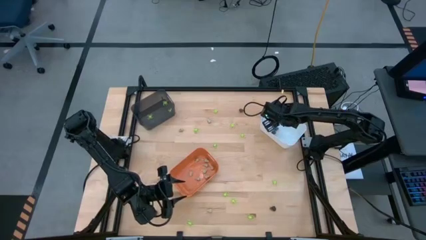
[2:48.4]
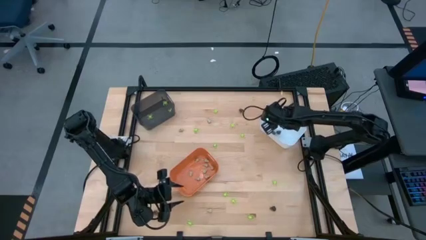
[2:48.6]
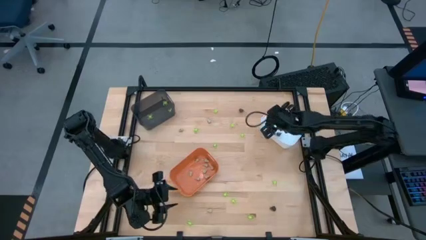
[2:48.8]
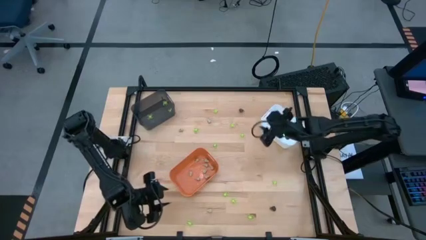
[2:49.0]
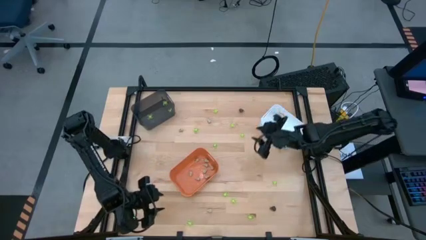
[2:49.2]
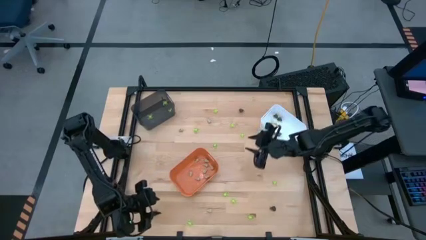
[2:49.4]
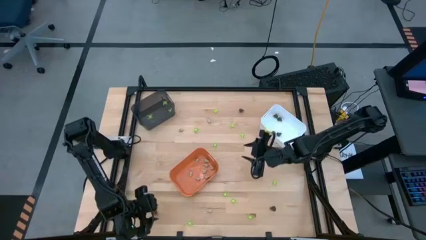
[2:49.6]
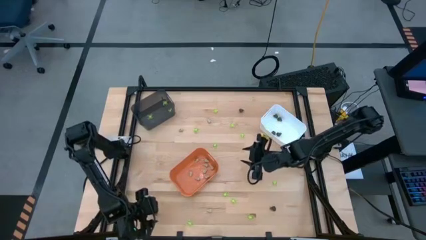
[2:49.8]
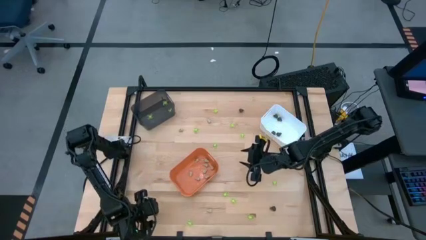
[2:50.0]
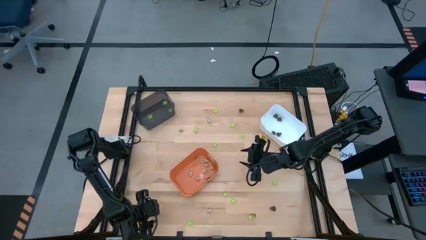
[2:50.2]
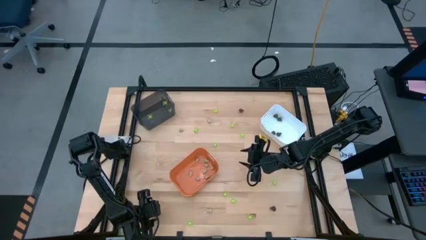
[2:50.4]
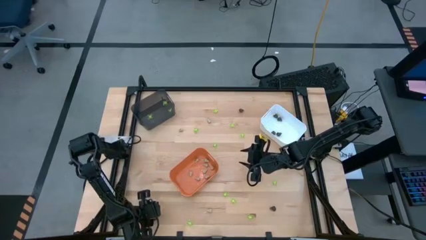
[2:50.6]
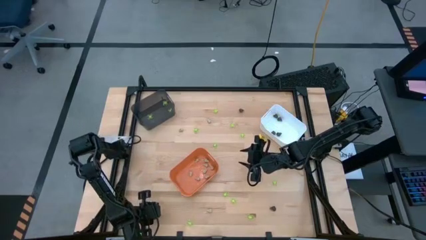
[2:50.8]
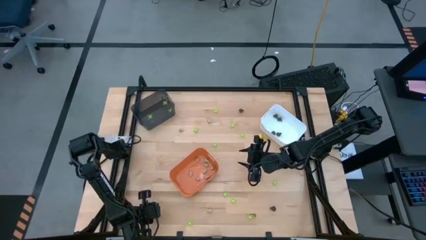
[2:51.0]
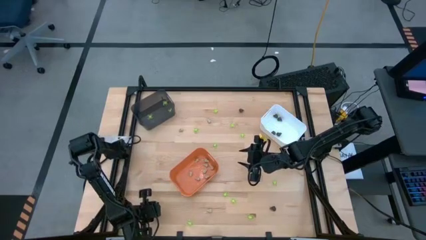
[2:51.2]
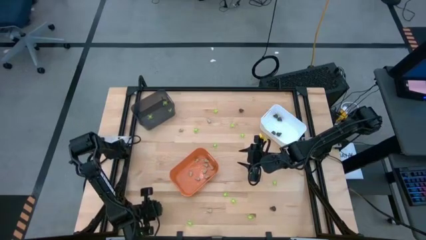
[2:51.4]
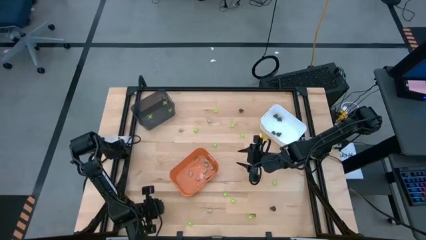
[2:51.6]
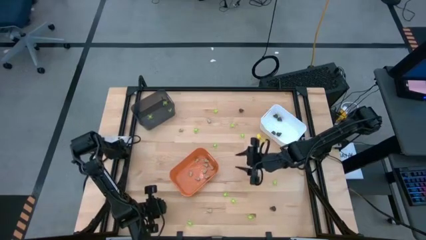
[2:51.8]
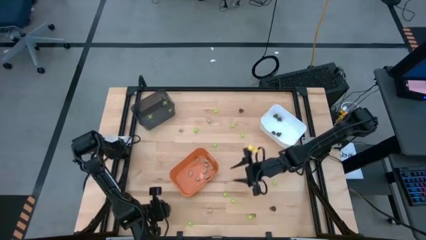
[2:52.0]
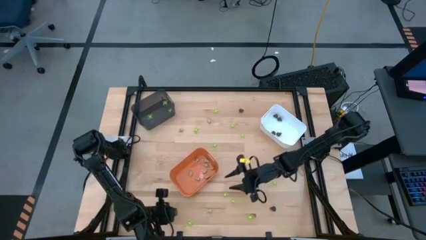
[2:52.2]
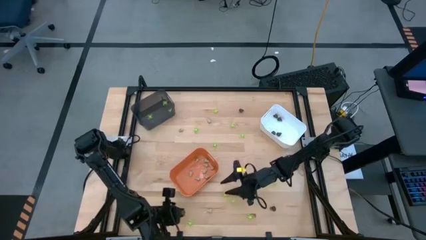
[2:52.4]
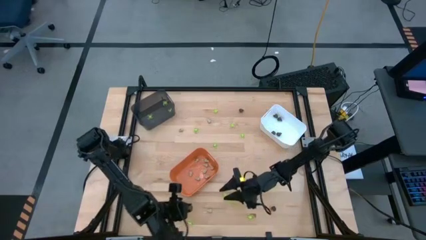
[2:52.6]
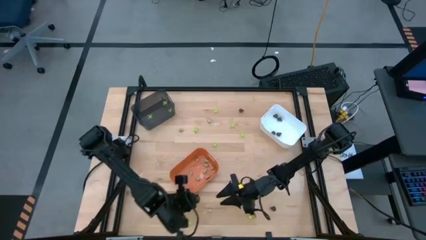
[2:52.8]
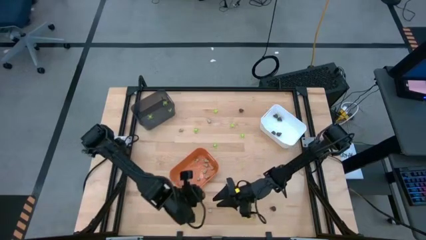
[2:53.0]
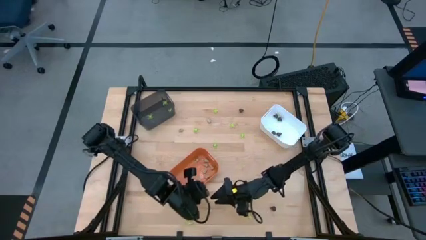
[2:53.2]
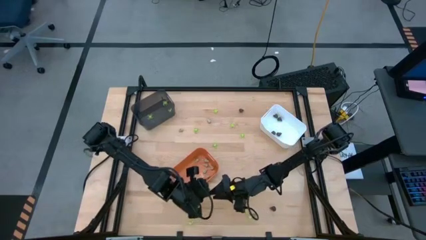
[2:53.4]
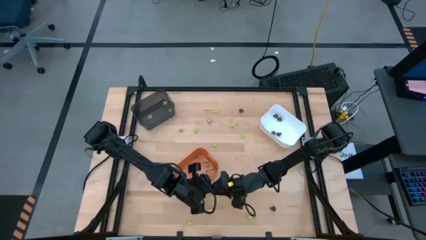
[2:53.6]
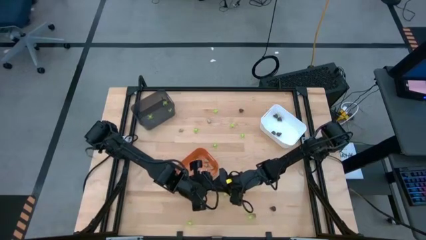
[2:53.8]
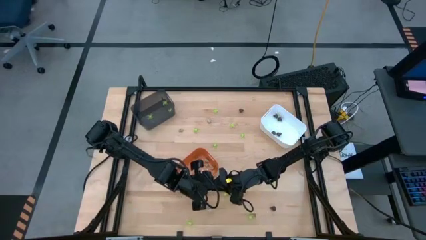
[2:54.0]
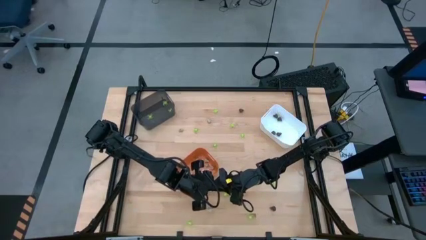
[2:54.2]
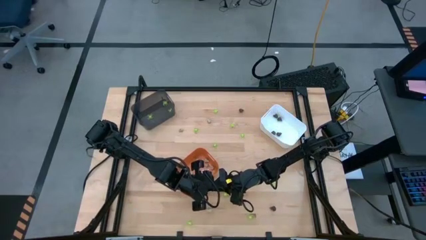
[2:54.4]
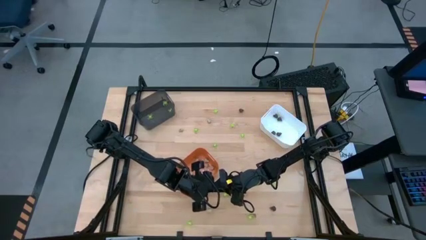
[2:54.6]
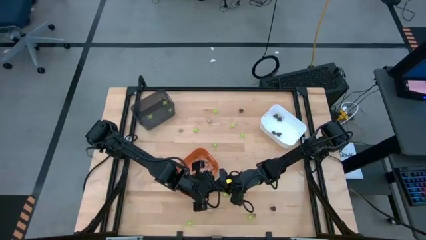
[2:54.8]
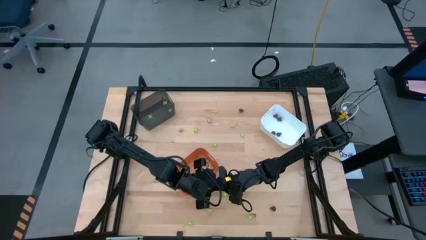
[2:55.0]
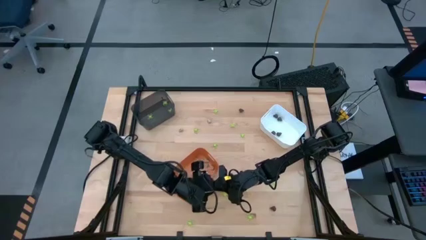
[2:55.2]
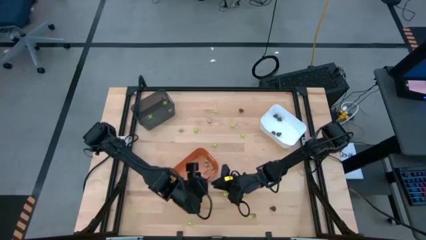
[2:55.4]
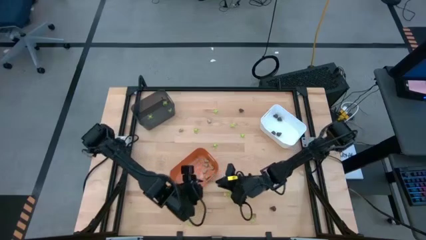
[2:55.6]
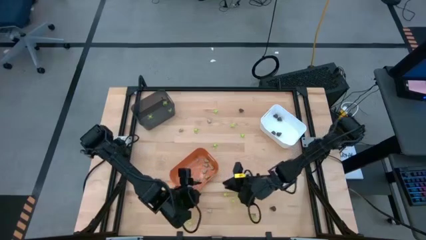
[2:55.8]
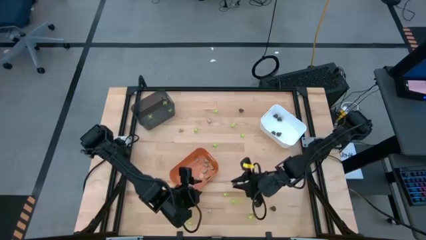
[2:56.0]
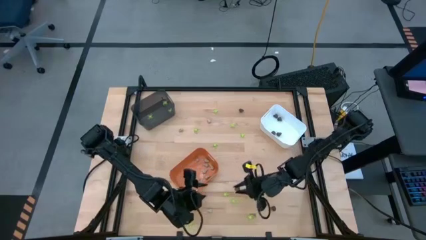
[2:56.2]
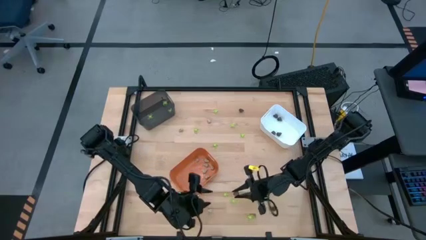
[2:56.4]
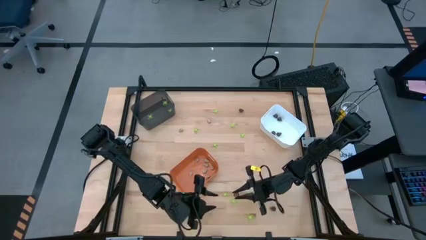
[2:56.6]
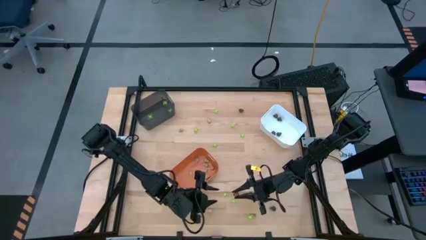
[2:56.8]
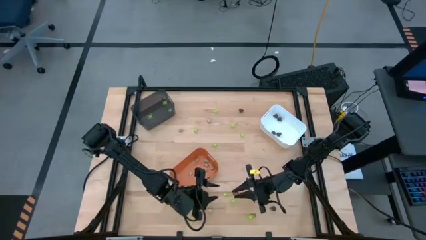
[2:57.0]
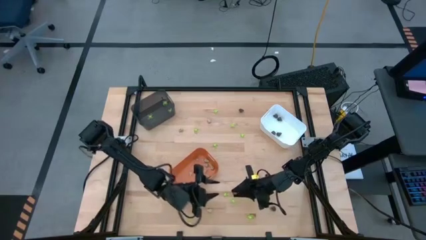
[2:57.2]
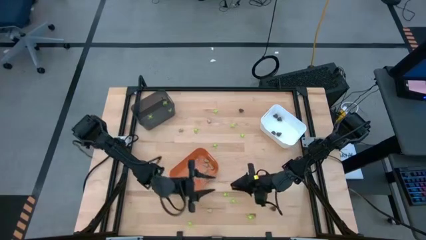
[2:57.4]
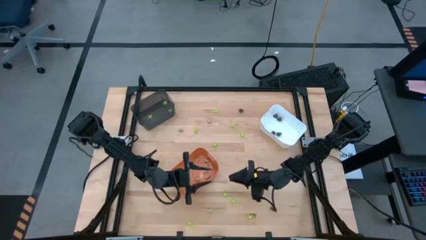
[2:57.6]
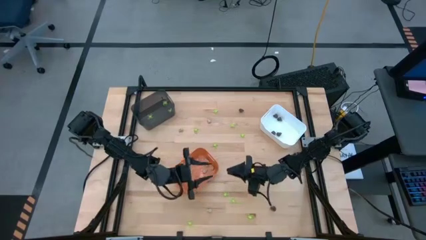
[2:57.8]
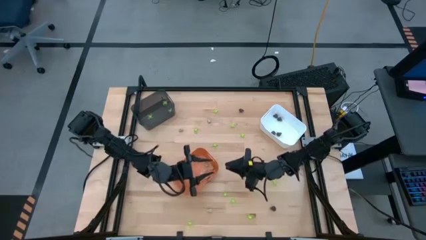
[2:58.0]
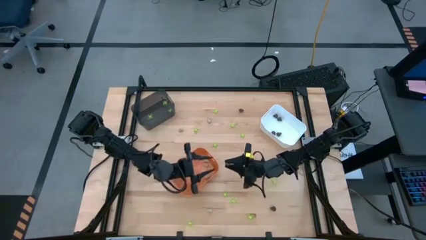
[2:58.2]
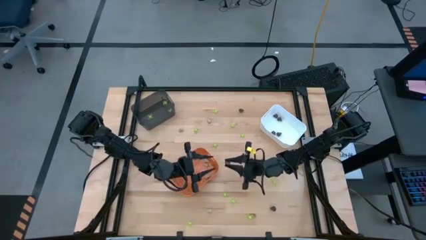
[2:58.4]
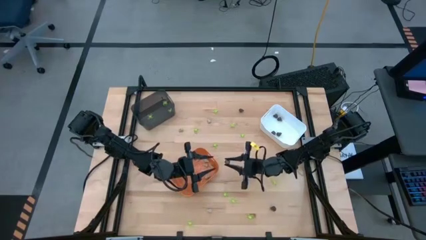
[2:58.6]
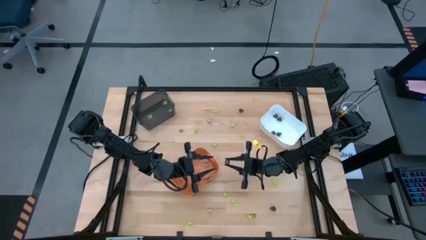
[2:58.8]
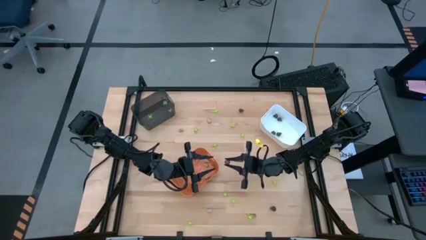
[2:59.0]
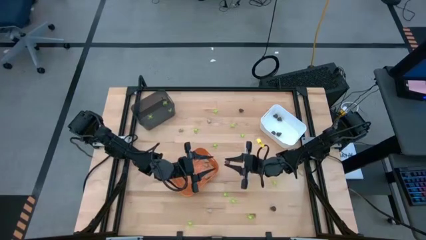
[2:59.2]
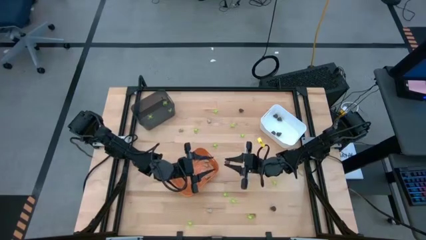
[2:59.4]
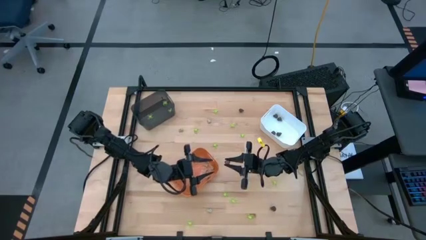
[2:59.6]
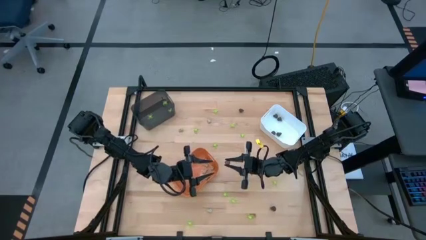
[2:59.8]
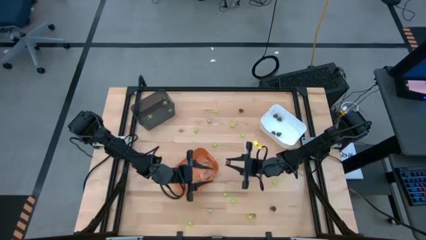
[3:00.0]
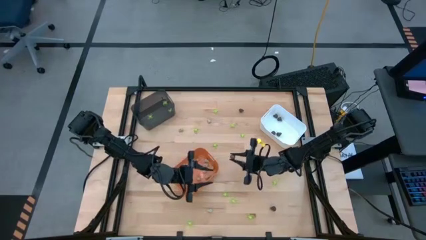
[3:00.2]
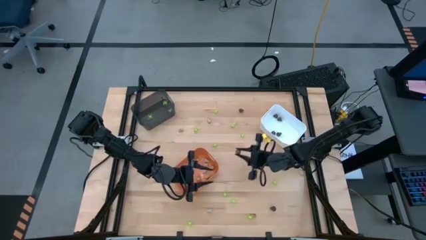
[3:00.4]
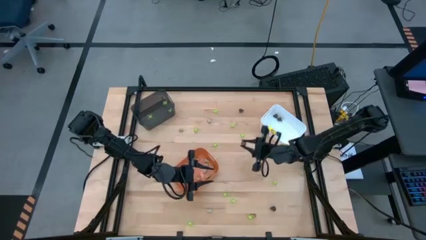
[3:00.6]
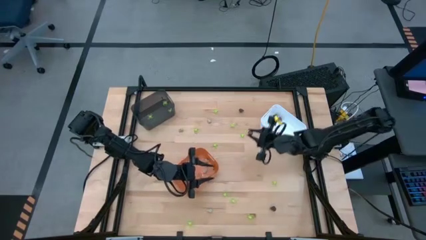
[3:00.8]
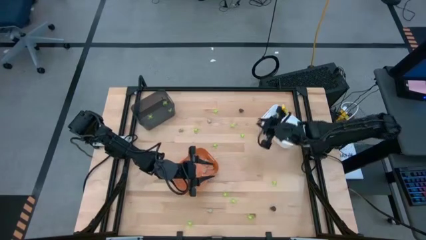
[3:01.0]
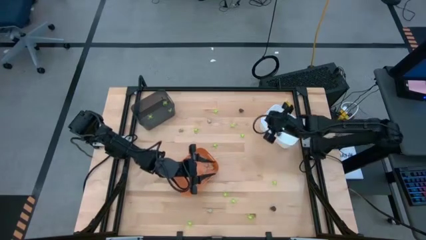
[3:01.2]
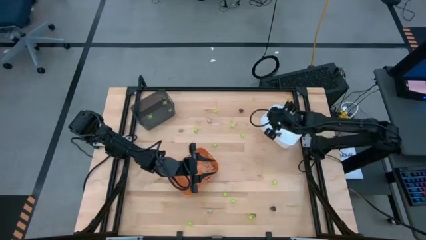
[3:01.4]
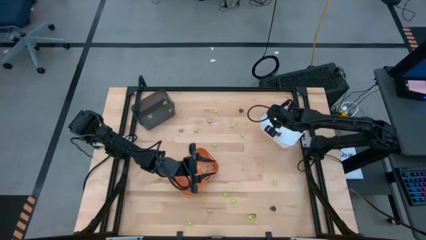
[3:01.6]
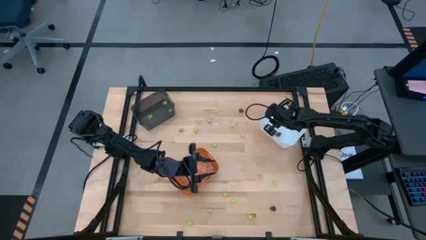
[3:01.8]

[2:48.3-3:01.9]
Task: Sort Halloween decoration
Put the small transparent skull toy into the white bin

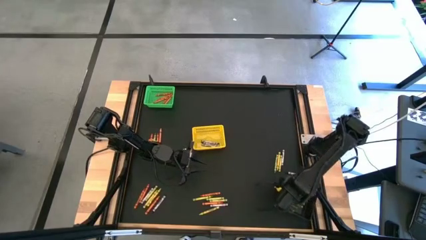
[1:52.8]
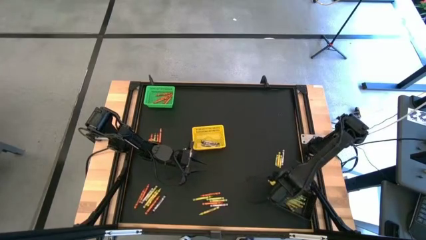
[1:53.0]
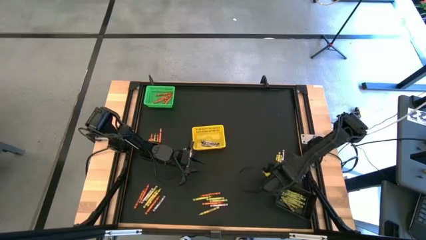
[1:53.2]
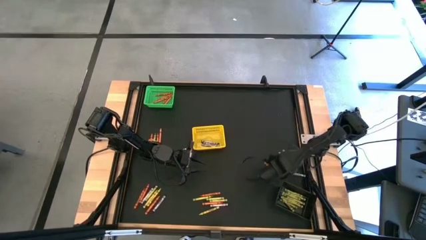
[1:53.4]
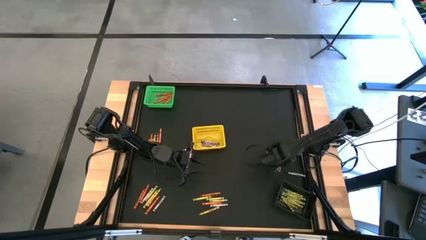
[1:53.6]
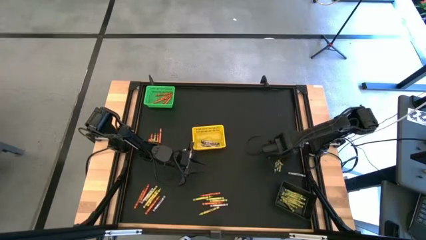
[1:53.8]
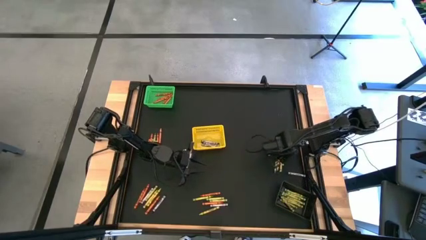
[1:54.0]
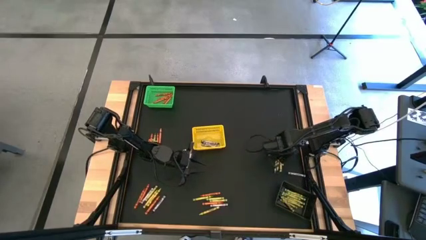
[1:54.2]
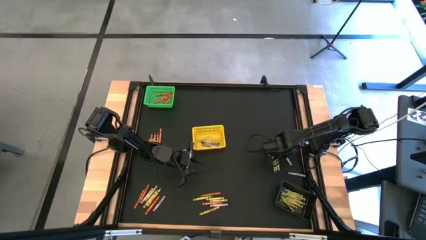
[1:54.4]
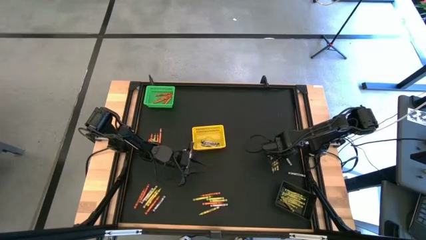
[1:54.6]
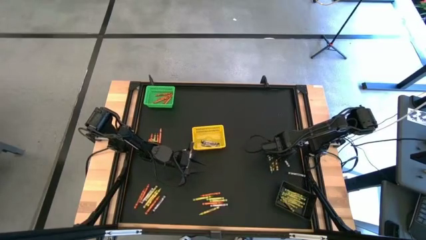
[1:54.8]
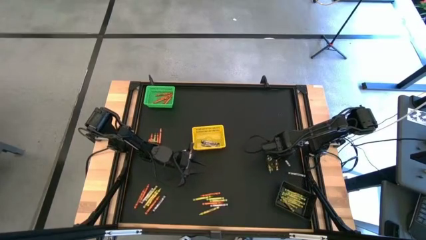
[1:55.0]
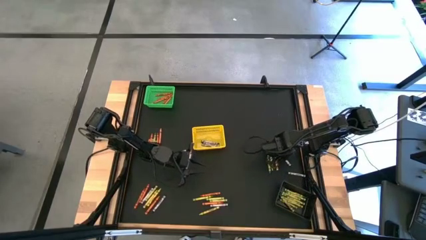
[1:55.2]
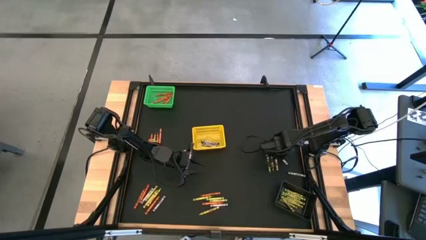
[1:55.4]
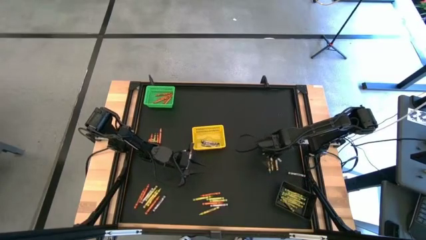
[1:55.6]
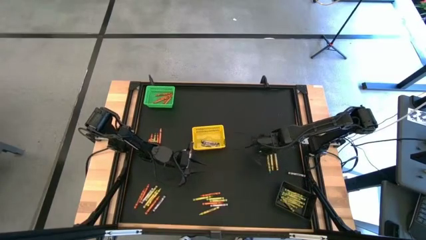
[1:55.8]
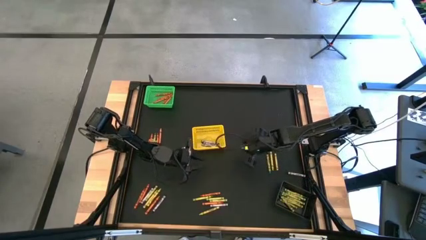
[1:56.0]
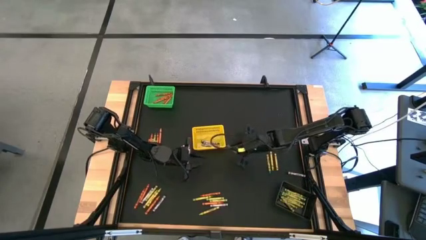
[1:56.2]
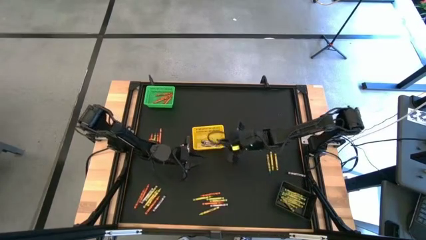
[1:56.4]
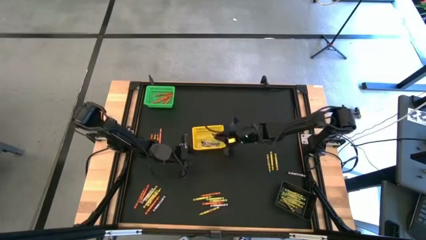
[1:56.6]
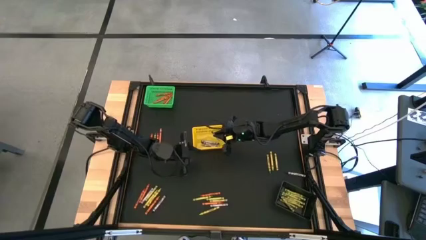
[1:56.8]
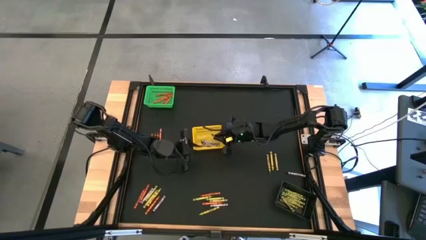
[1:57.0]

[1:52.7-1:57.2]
Task: Sort crayons
Put the black crayon into the yellow bin
